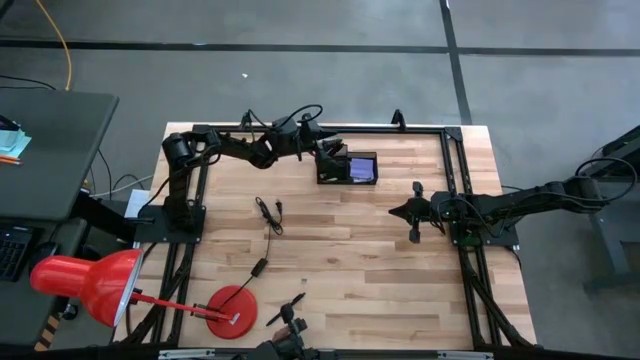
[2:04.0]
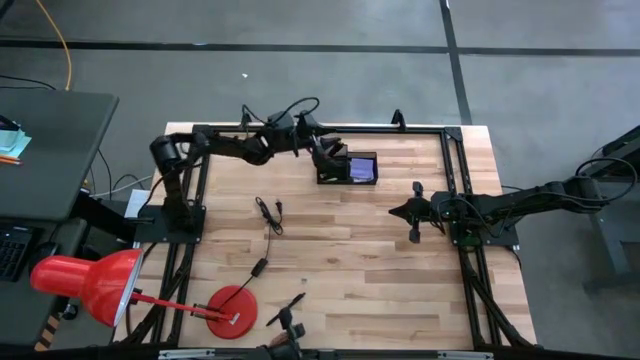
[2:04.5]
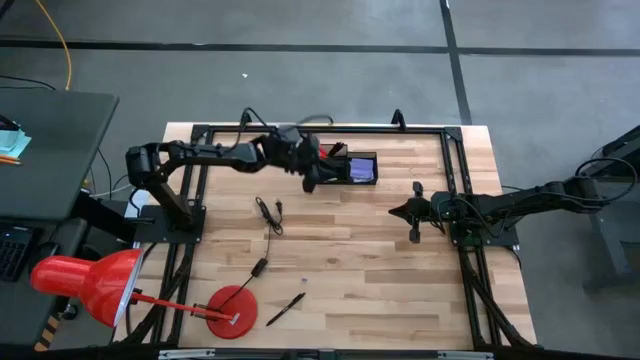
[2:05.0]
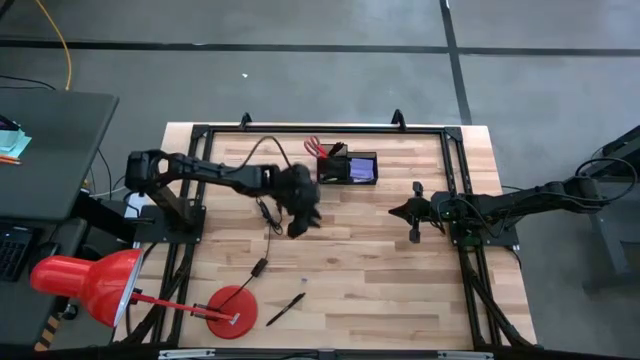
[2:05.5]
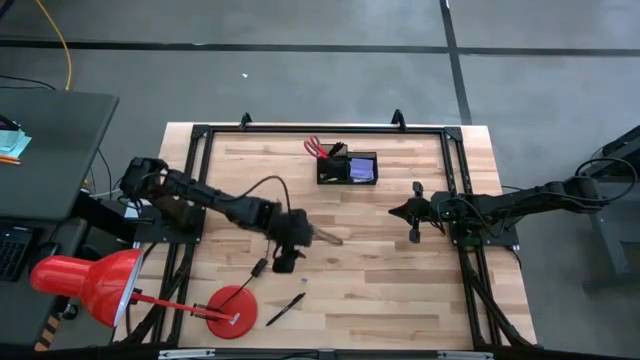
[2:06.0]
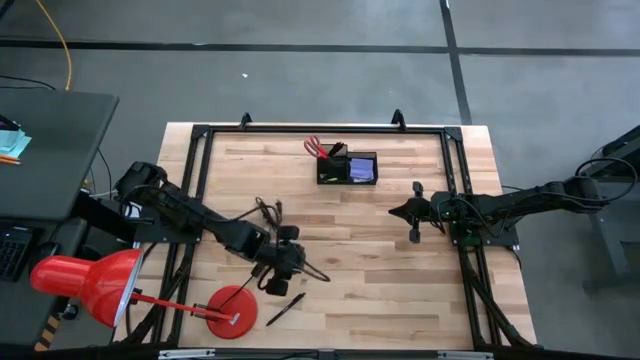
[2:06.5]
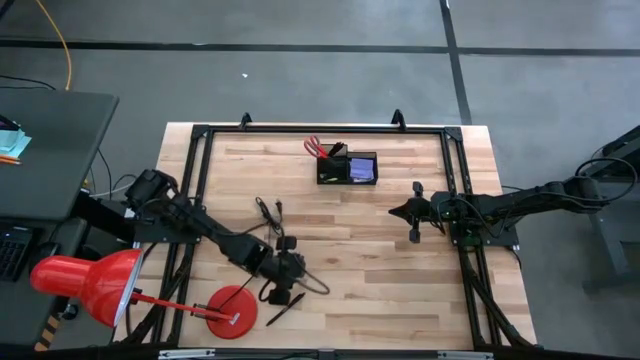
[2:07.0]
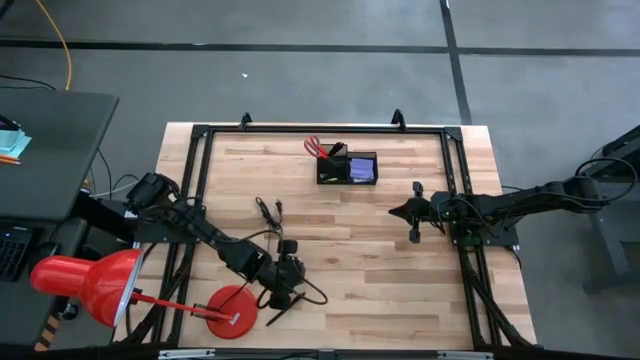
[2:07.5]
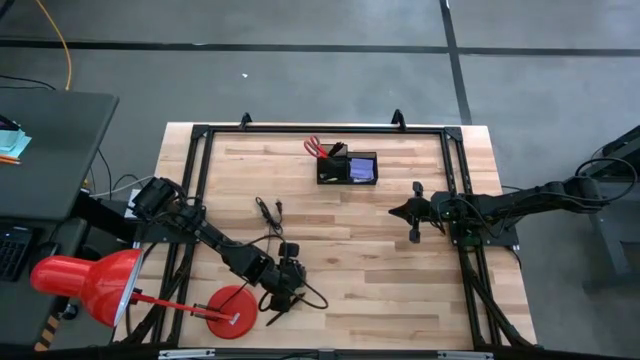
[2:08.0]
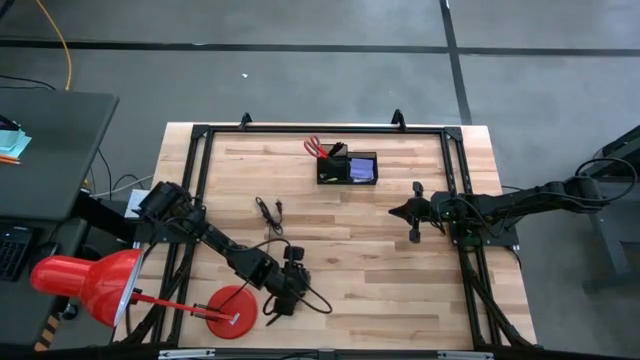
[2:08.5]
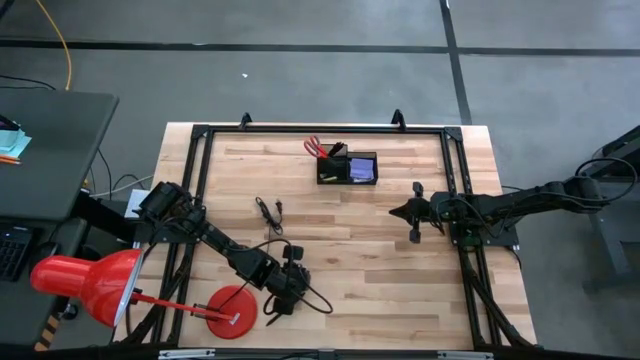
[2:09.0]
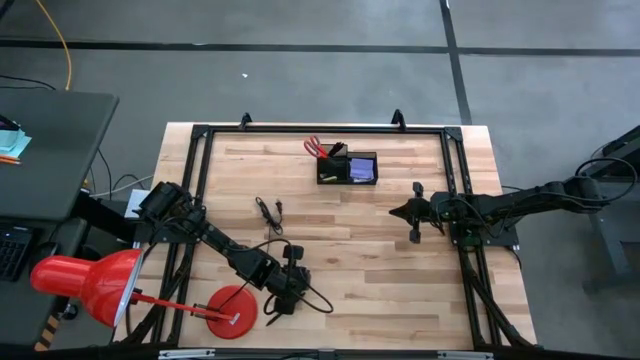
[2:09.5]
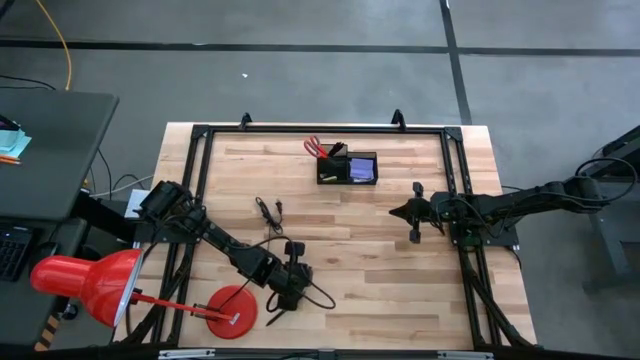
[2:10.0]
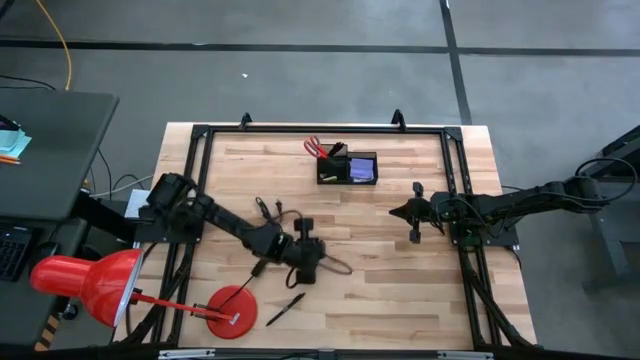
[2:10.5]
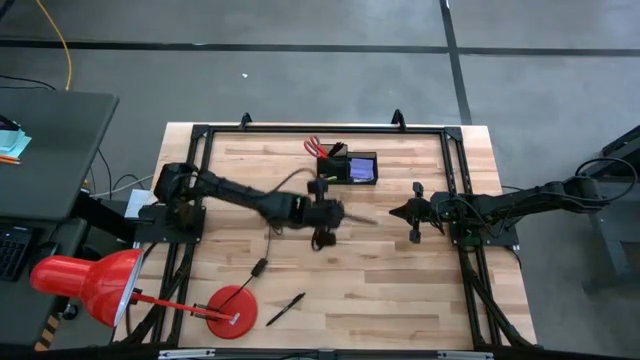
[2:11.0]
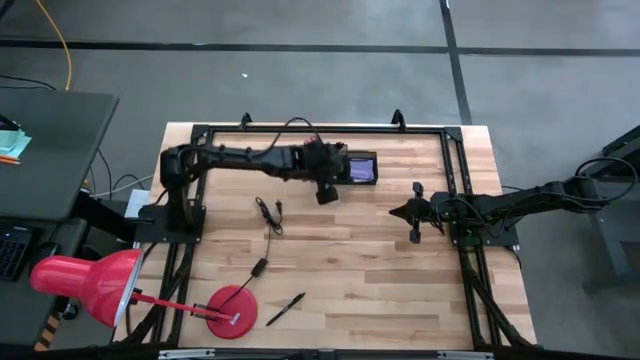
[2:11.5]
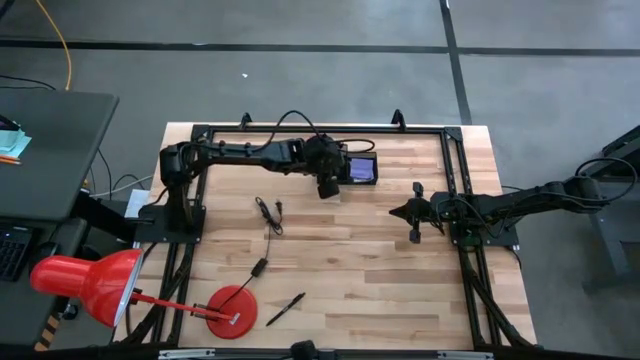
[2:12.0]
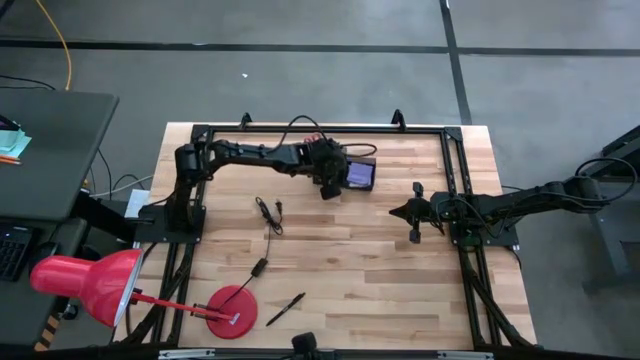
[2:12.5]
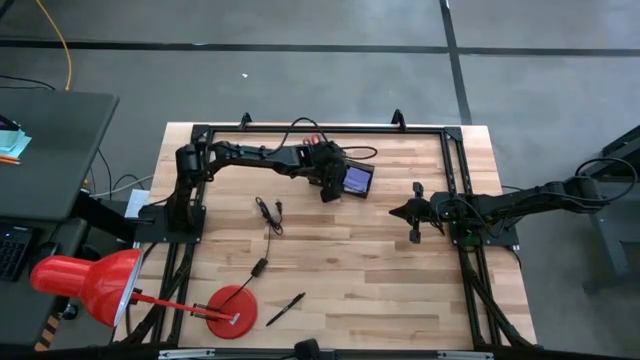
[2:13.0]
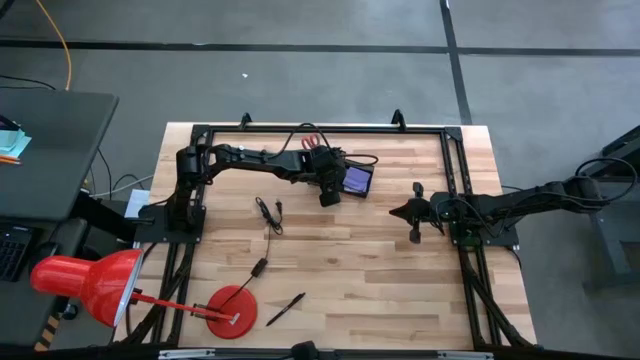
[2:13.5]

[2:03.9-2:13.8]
Task: Pick and place office supplies into organizer
Put the blue binder clip into the mesh desk organizer

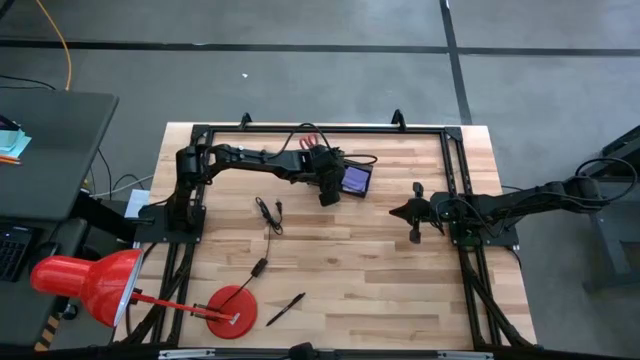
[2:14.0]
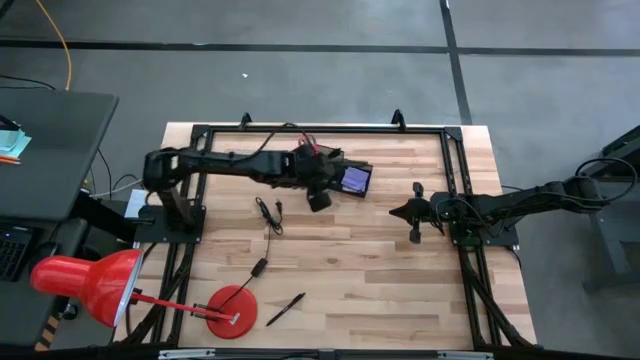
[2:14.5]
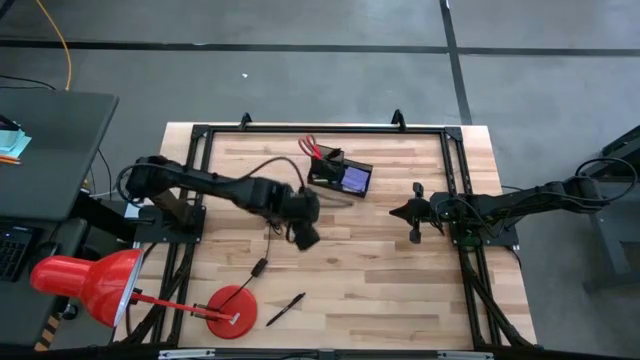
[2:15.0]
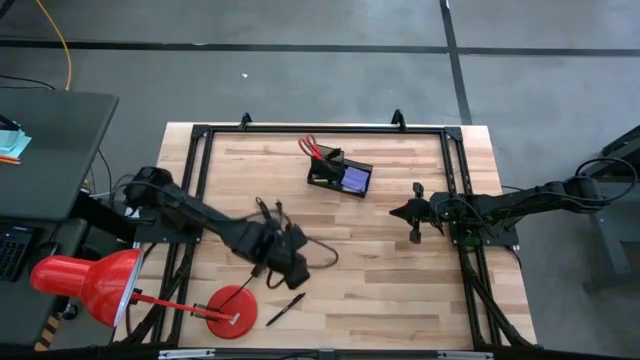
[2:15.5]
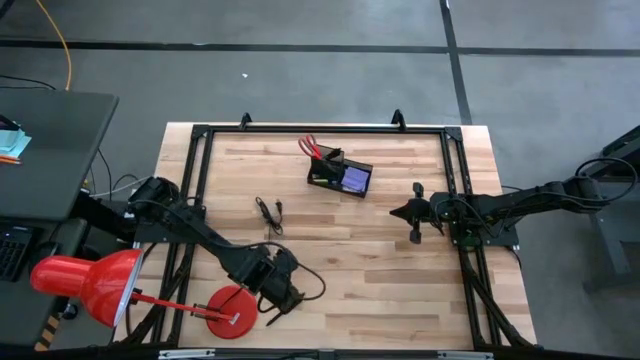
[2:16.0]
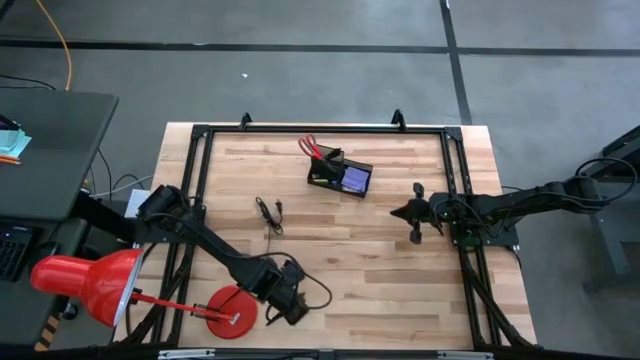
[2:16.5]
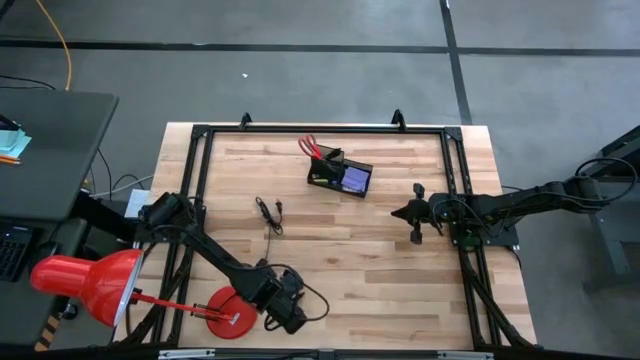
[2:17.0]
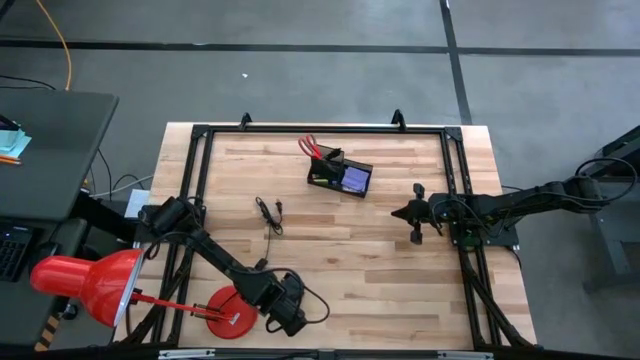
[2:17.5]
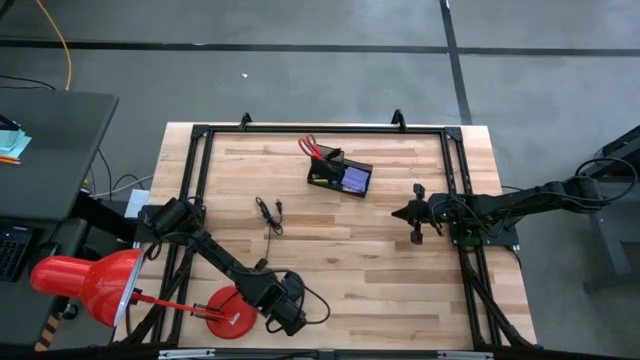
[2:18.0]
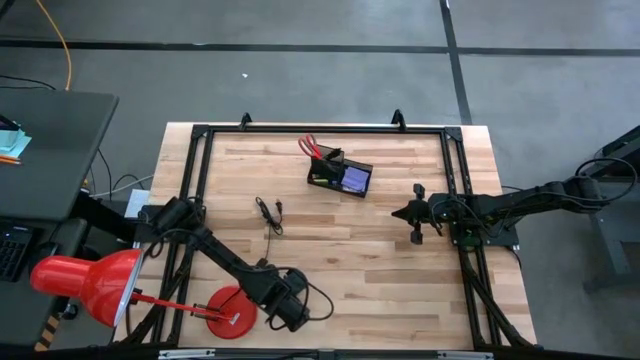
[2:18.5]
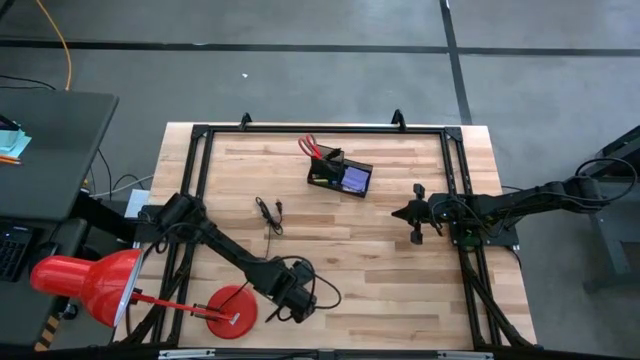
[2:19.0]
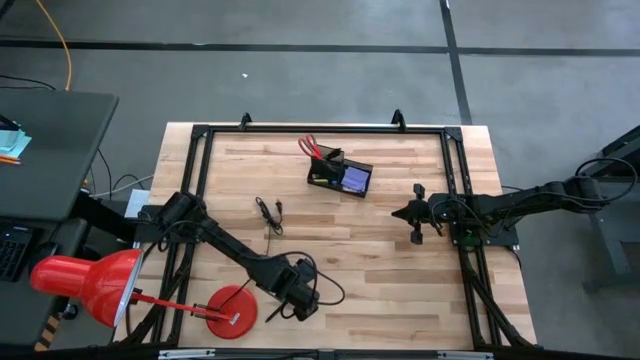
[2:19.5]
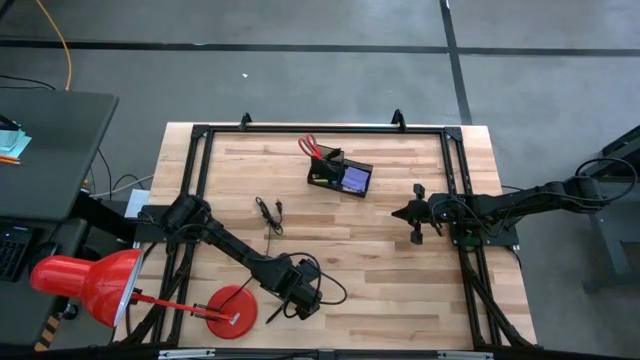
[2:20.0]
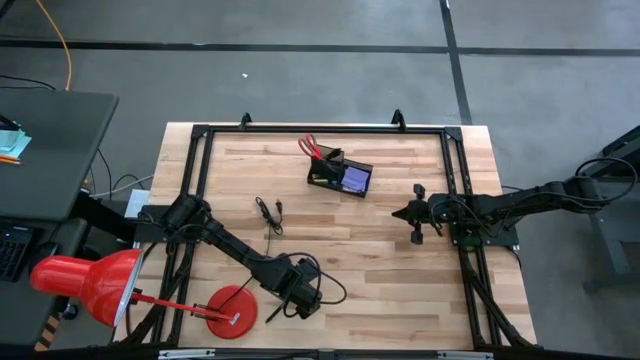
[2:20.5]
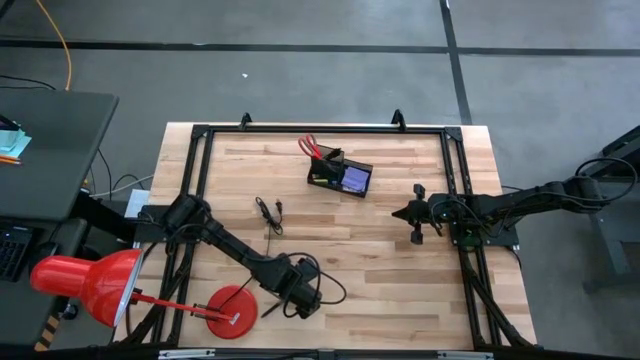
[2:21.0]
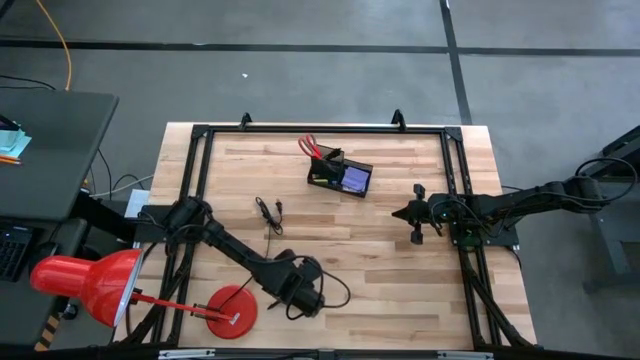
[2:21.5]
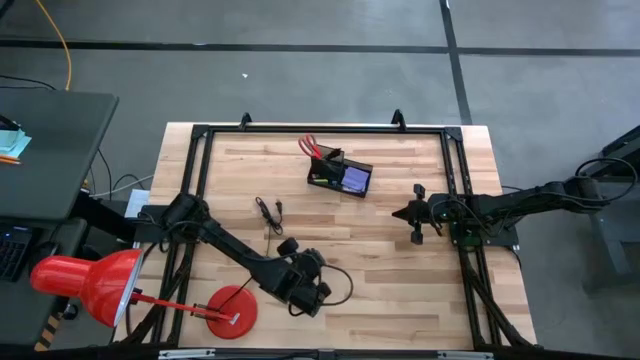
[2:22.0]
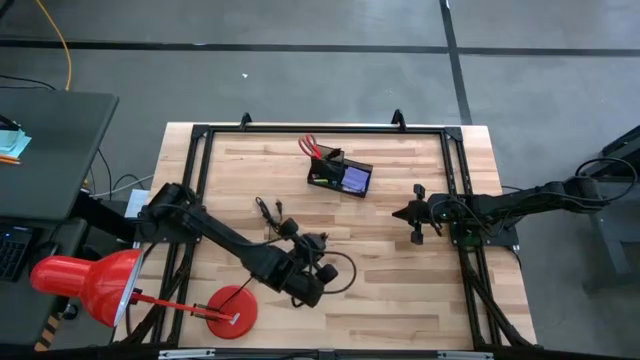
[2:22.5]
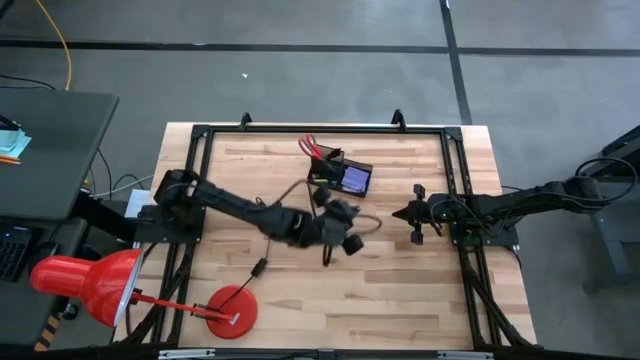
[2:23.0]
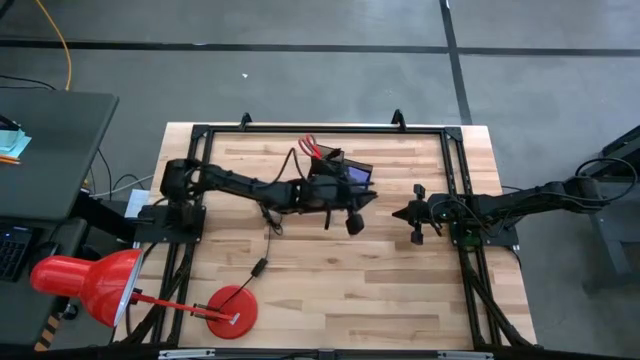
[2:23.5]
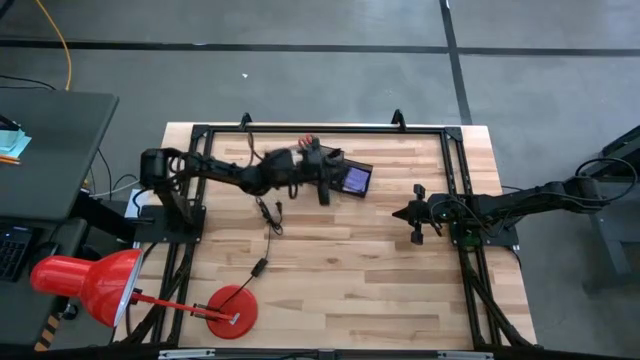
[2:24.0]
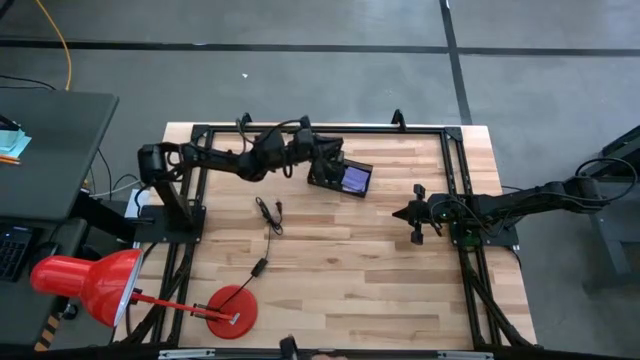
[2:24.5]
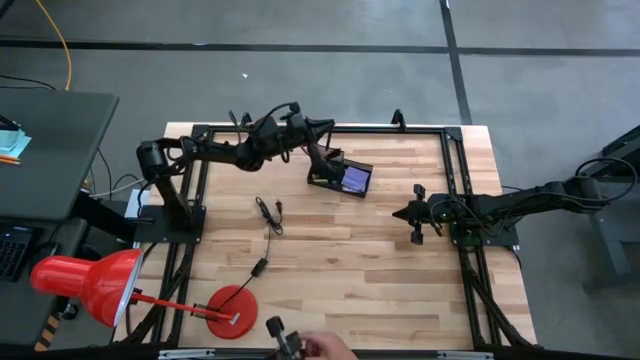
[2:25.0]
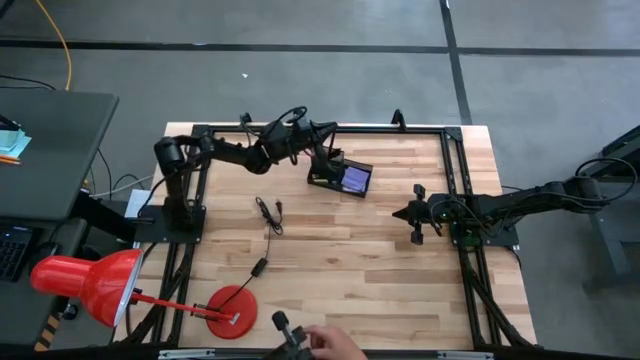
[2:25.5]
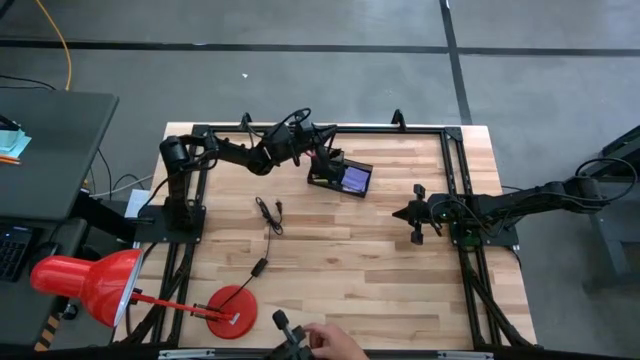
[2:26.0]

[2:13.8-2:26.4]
Put the black pen into the mesh desk organizer
